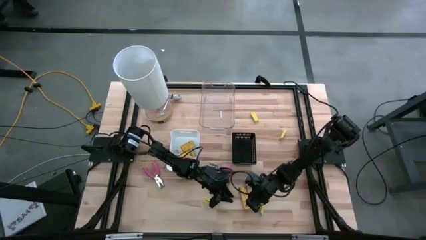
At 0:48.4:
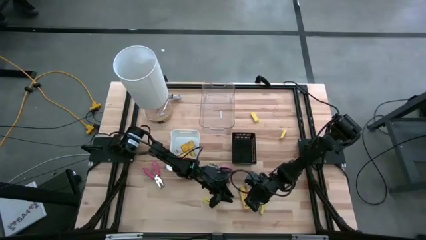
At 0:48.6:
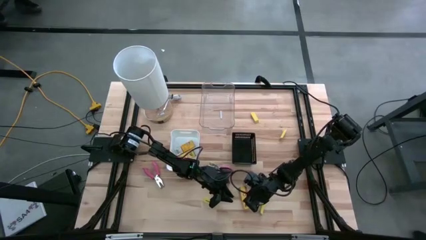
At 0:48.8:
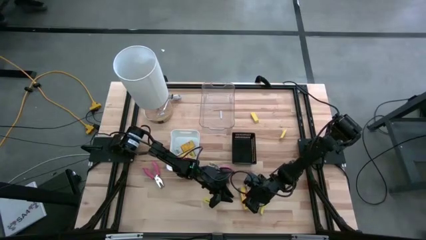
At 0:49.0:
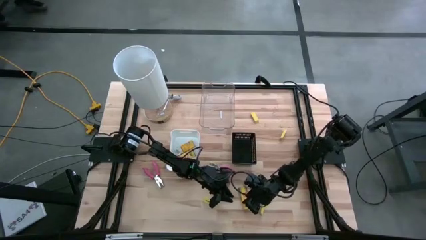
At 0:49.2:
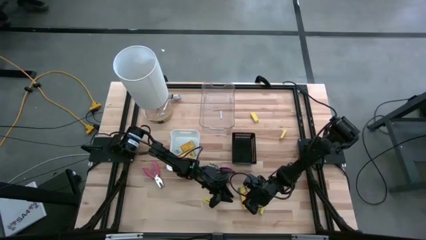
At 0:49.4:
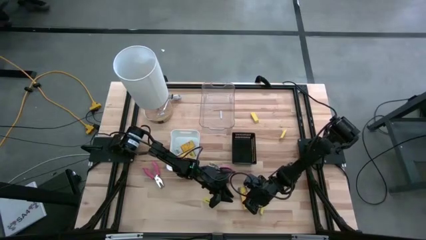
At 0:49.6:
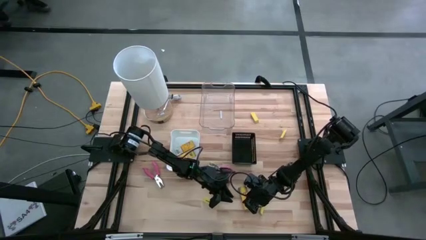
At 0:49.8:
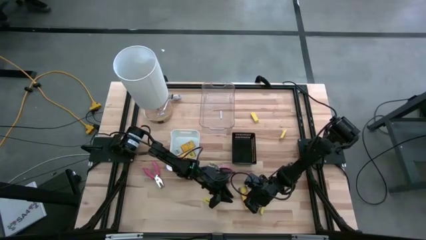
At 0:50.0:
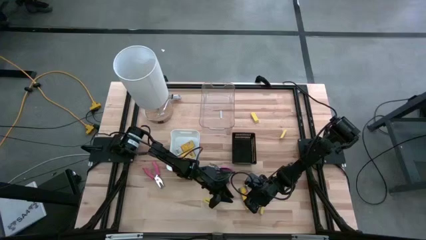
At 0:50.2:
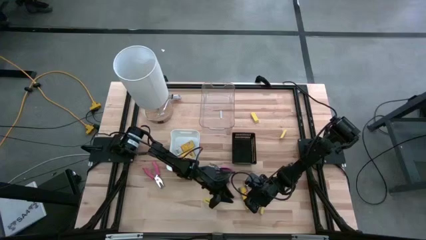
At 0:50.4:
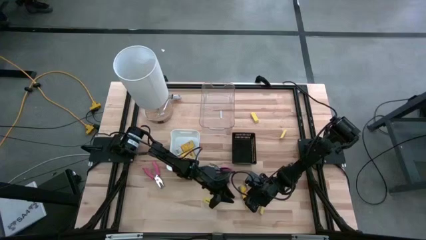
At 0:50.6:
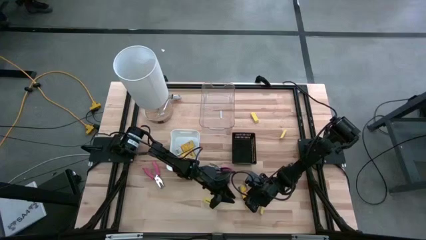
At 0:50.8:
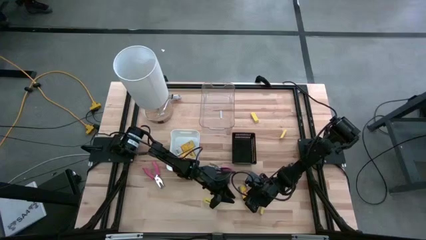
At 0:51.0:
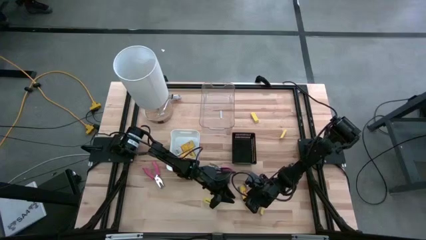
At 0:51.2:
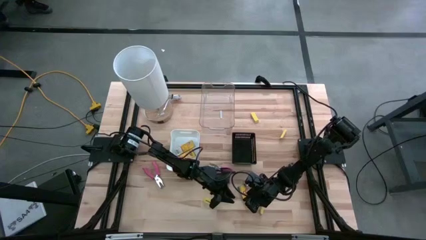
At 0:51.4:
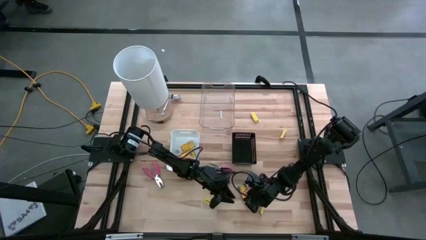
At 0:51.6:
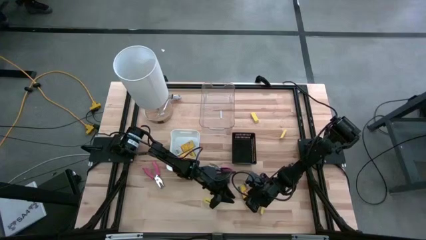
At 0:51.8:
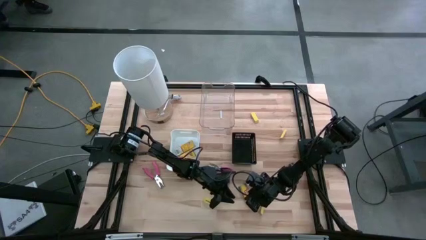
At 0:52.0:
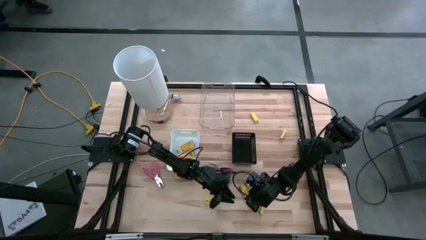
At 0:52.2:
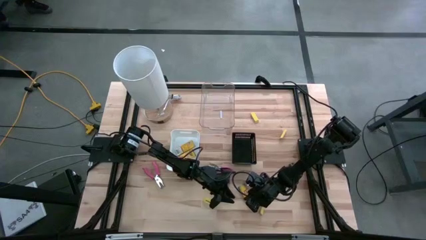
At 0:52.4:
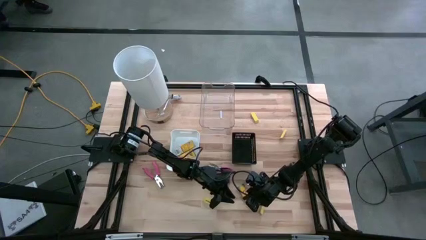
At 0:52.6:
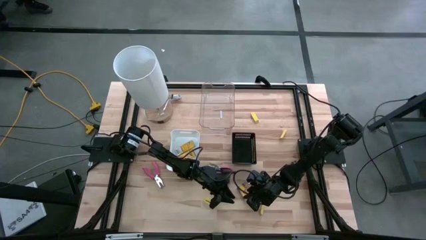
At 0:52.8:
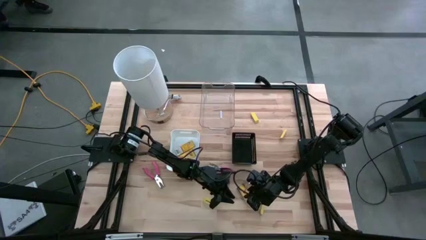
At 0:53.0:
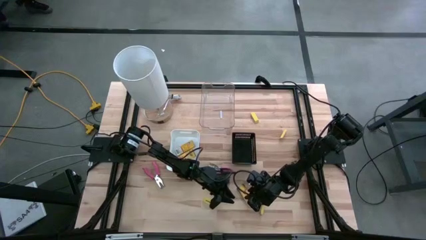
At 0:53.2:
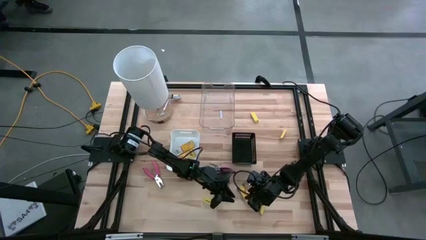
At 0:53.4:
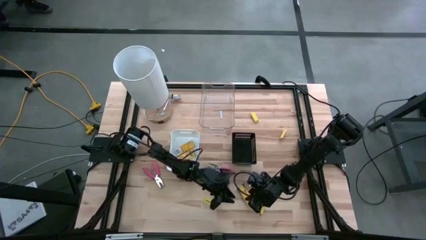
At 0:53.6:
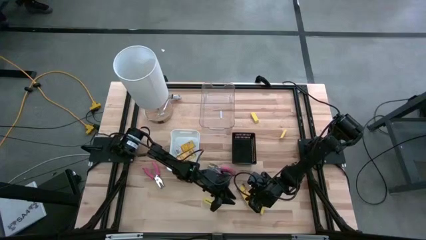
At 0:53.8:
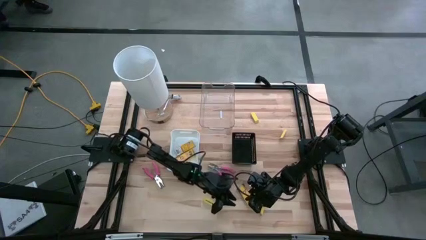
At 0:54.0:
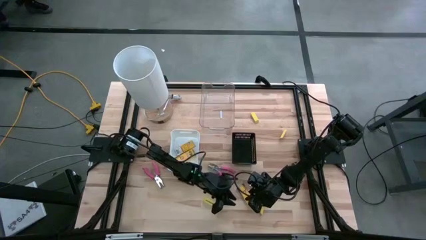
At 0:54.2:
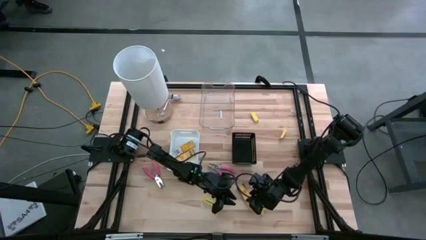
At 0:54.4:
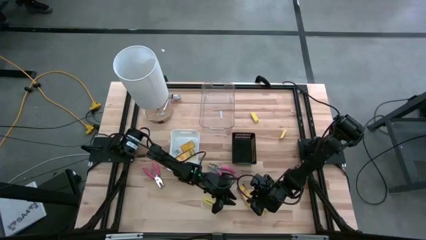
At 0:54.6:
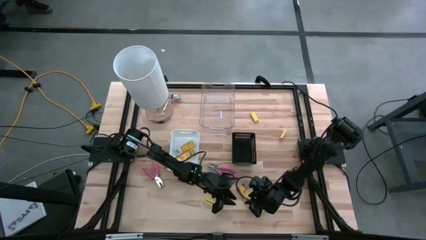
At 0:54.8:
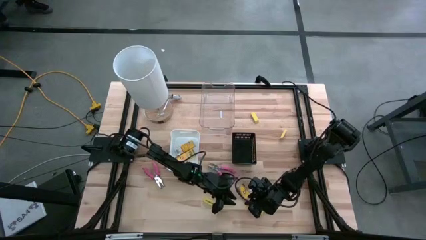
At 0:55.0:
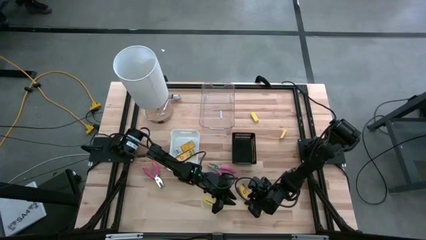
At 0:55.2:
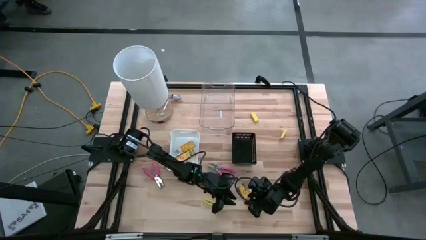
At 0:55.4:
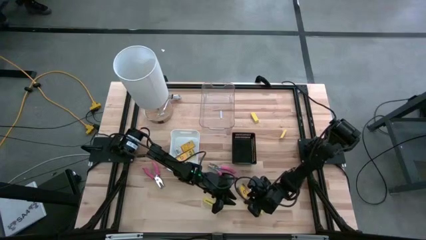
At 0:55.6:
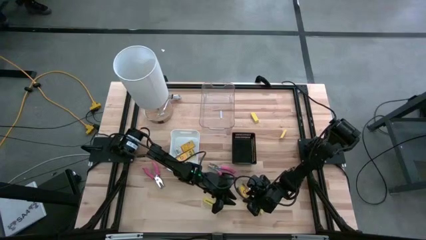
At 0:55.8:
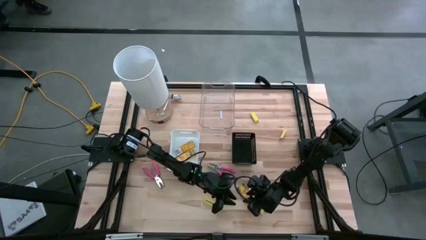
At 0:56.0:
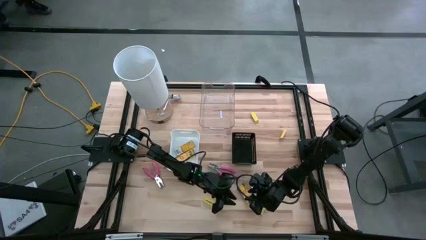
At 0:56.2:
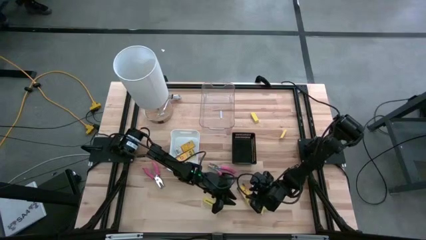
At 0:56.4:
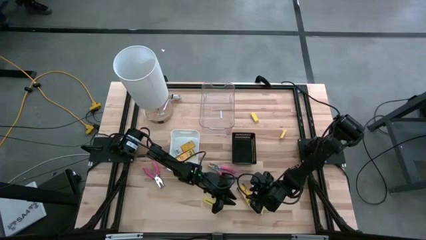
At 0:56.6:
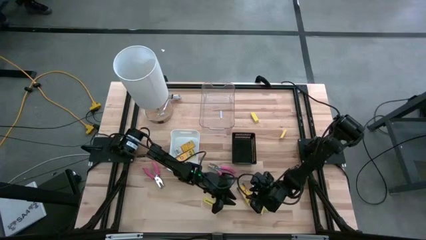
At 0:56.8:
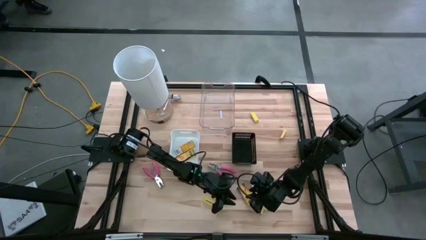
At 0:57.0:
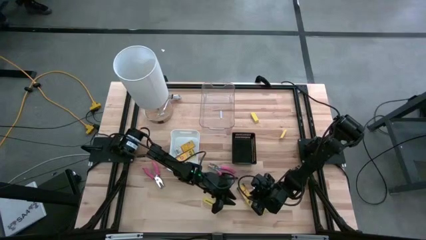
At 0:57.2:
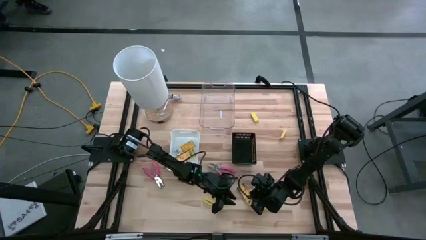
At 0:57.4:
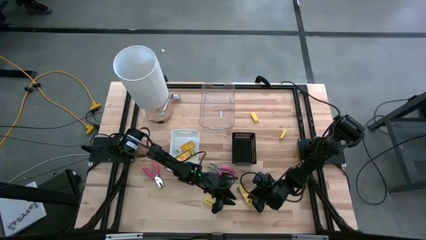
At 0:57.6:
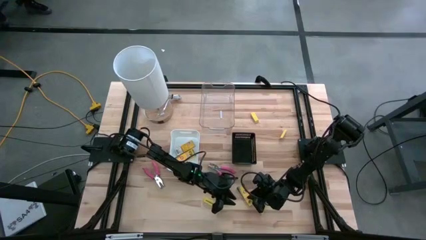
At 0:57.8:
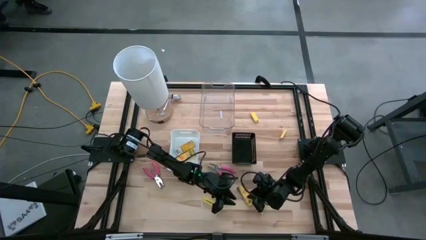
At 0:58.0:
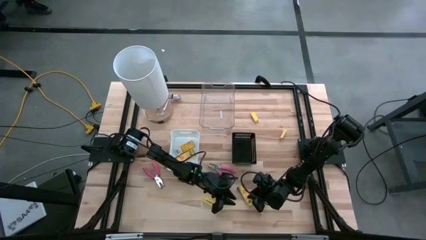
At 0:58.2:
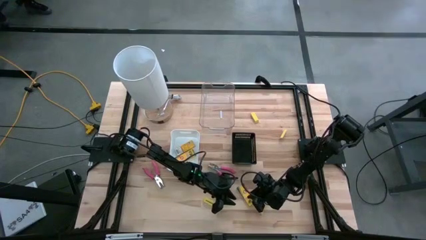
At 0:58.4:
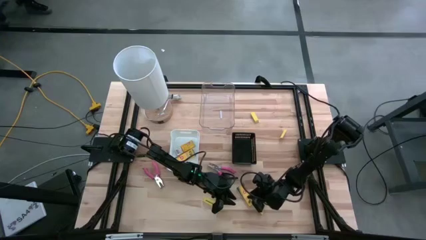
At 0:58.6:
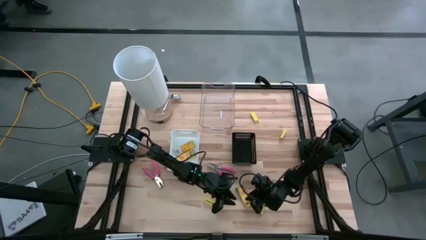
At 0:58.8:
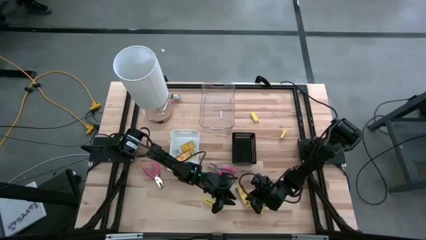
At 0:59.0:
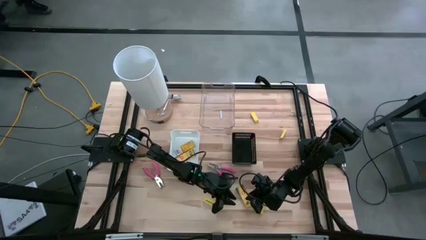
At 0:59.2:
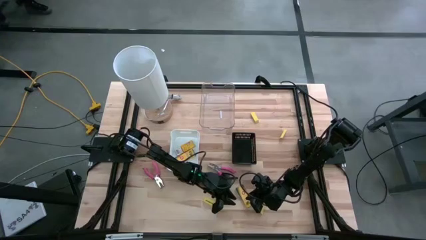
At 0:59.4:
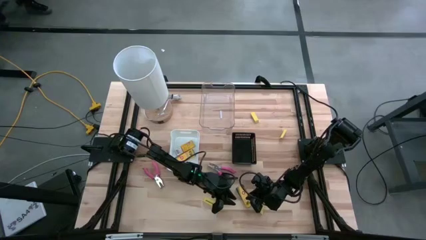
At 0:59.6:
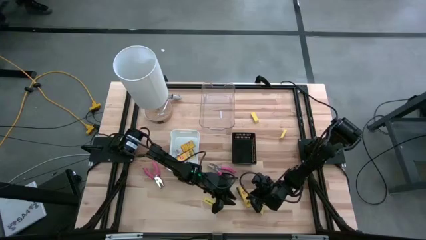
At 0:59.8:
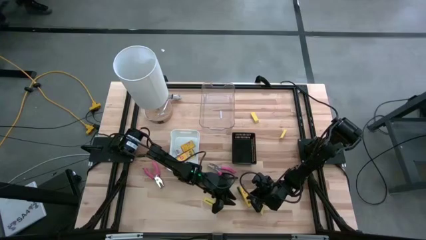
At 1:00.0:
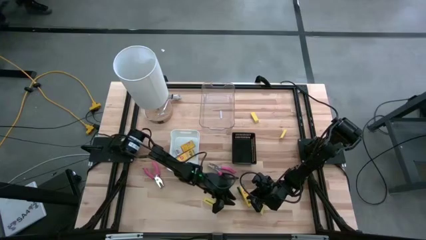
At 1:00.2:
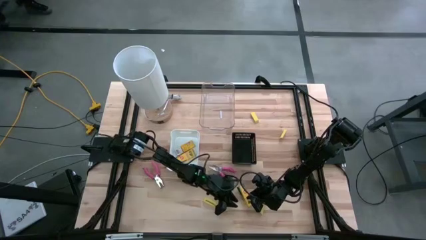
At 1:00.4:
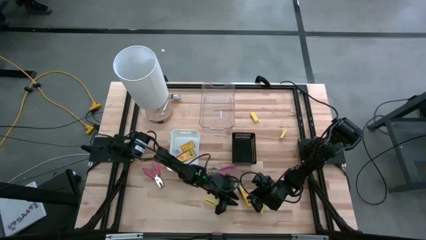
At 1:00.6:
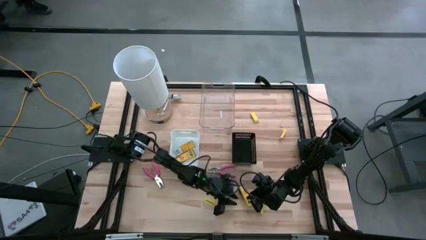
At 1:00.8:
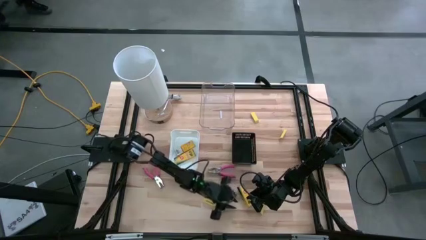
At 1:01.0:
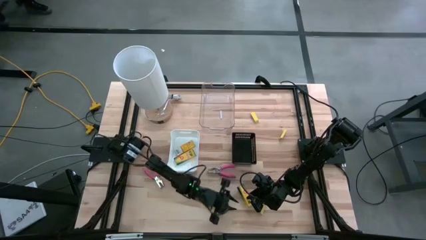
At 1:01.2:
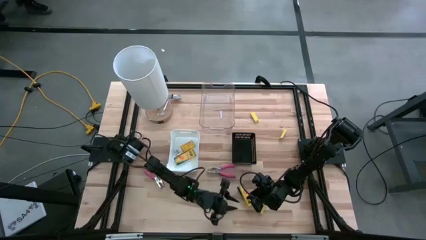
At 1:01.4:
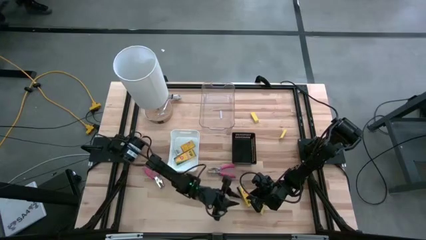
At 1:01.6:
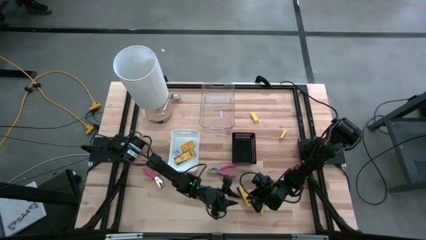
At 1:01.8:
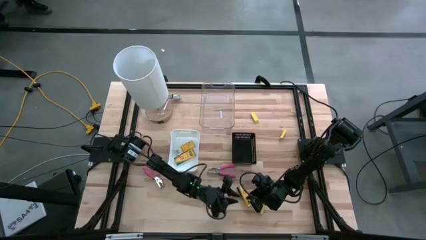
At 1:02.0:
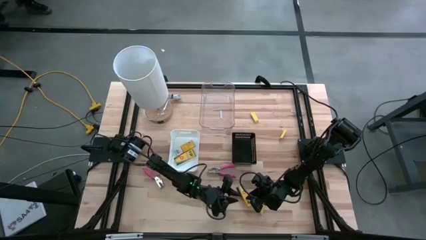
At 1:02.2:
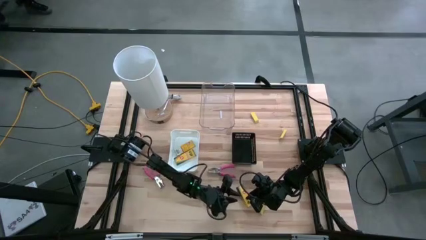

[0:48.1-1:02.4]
Task: Pick & Place School Supplies
Put the box of crayon into the white bin
